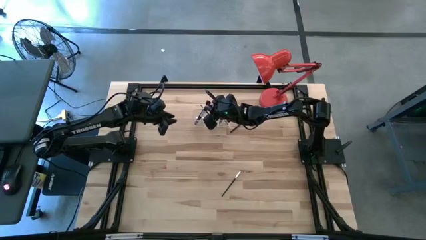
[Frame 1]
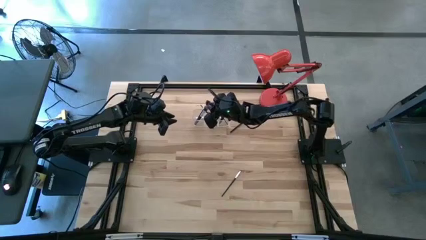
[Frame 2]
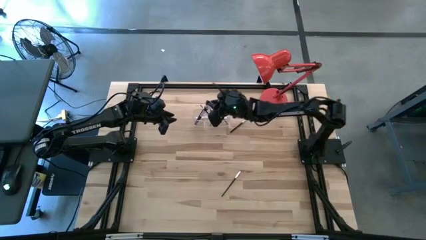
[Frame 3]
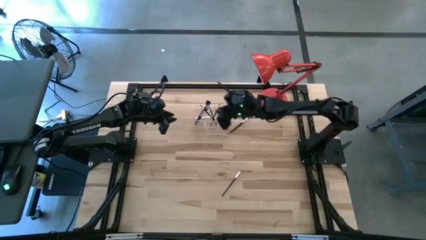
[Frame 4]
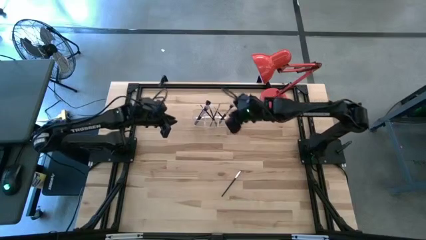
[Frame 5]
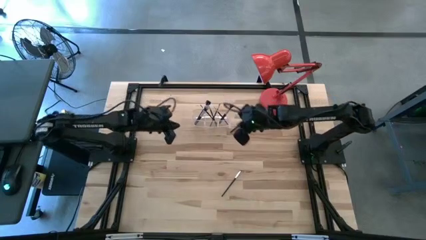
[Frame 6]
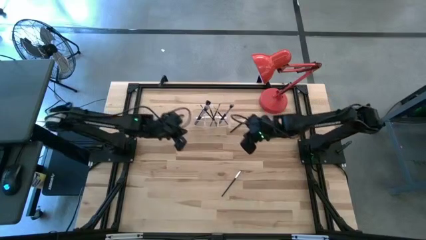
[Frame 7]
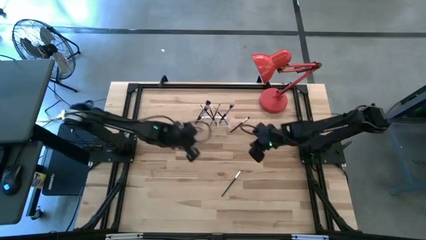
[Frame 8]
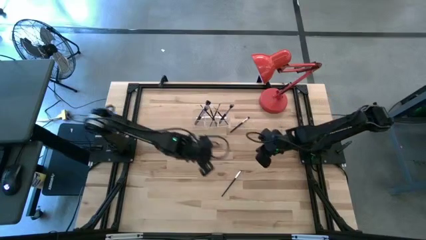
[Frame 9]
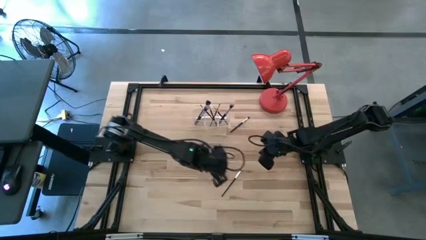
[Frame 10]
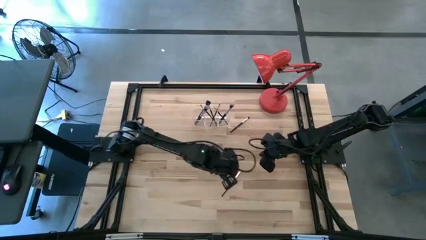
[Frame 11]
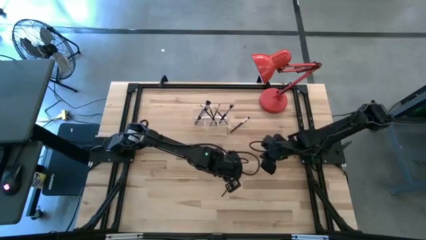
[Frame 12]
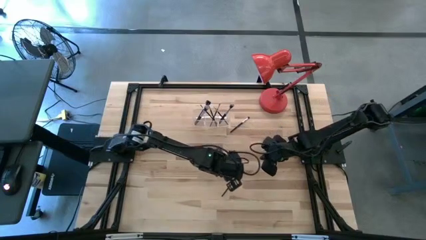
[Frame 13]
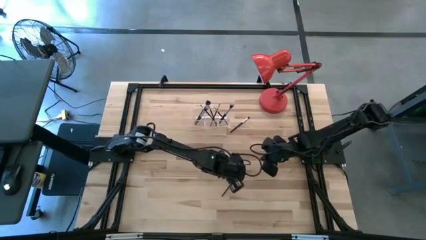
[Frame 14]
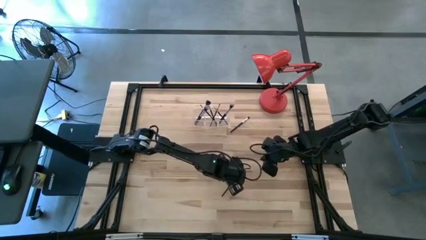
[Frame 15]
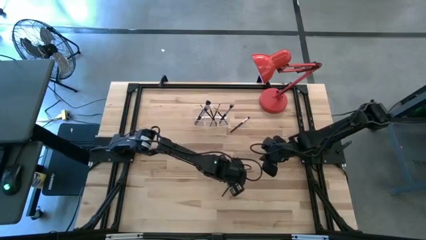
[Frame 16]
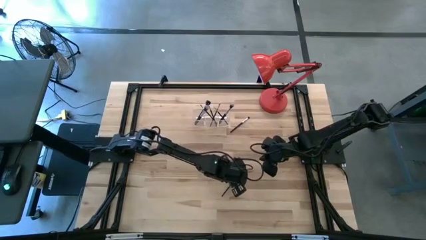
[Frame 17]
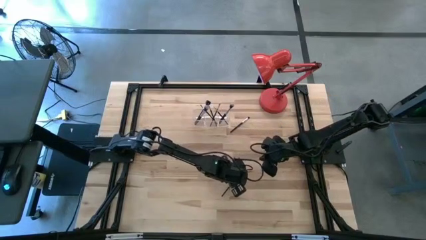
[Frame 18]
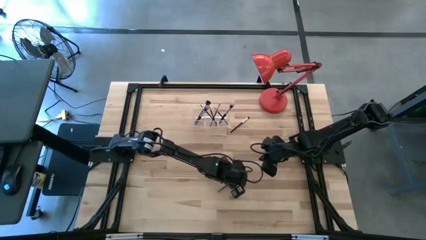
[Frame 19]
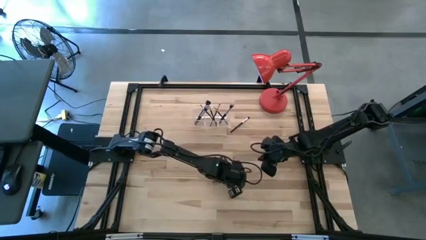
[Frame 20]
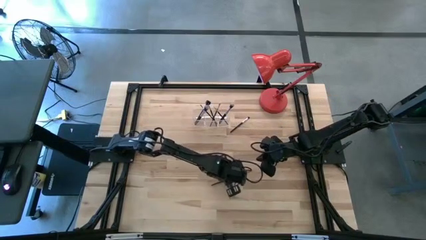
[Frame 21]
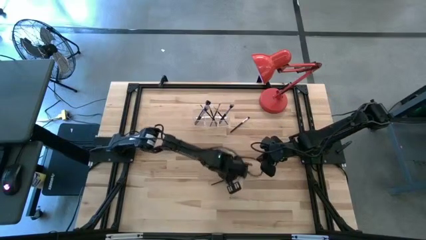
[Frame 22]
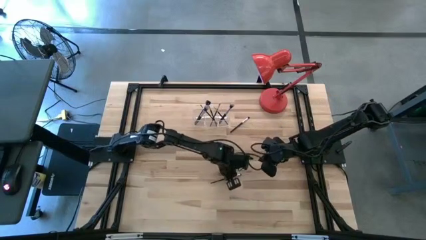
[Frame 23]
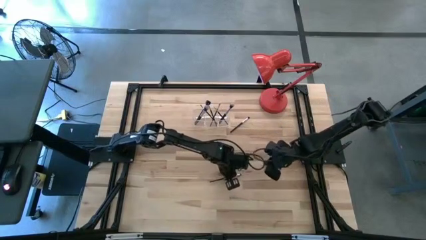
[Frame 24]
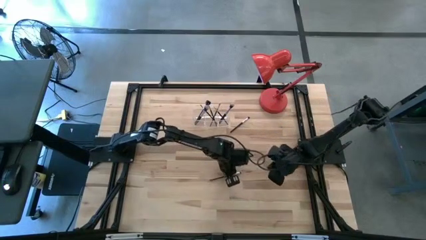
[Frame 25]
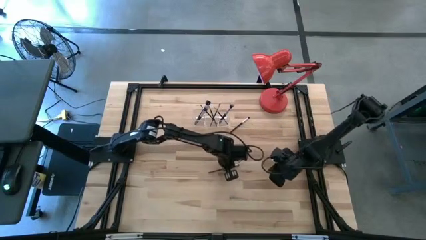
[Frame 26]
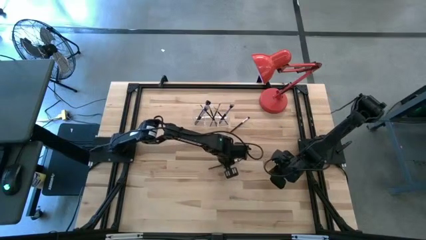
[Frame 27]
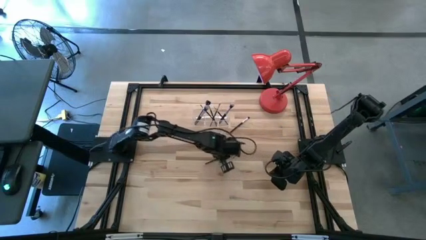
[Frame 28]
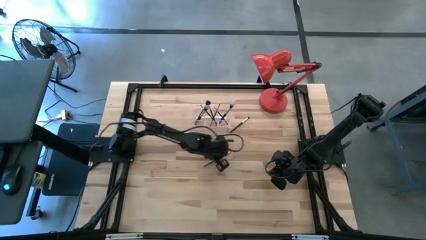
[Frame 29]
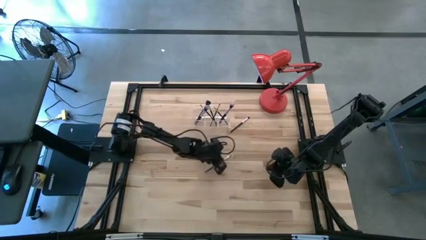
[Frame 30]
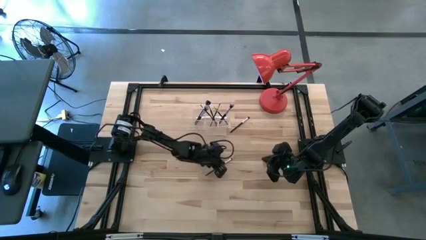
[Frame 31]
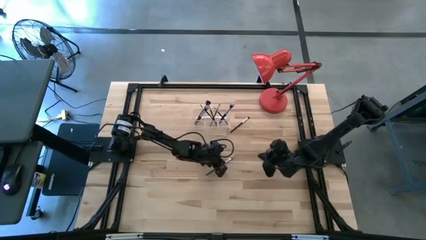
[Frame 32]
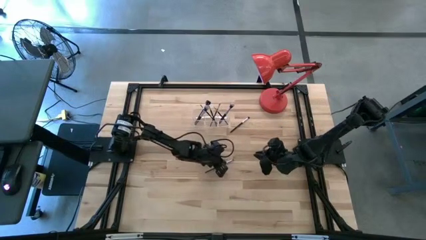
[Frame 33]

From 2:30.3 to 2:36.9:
Task: Put items in baskets/containers
Put the black eyeshadow brush into the transparent organizer

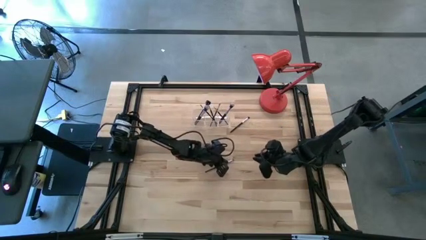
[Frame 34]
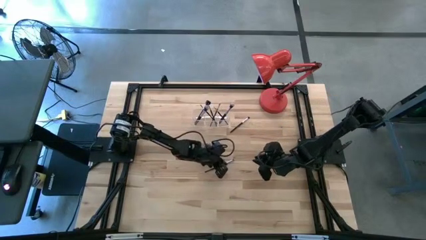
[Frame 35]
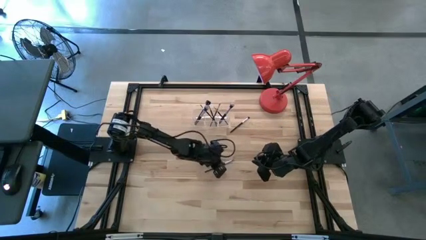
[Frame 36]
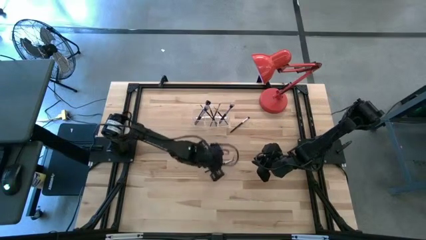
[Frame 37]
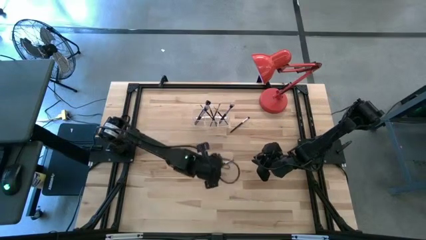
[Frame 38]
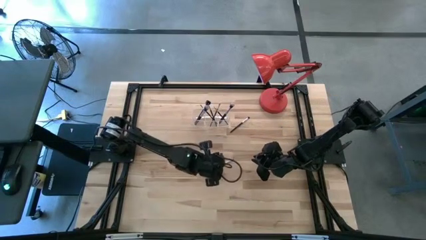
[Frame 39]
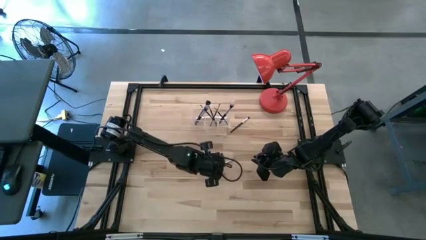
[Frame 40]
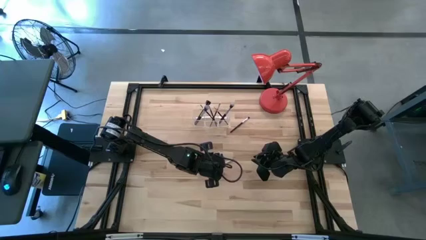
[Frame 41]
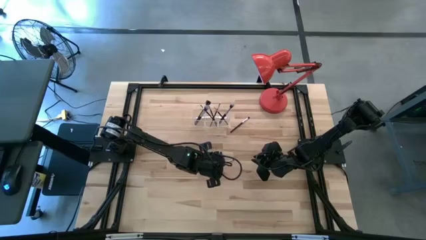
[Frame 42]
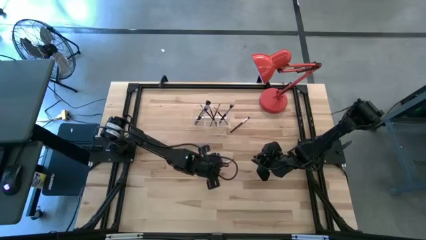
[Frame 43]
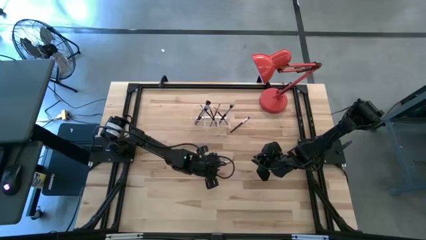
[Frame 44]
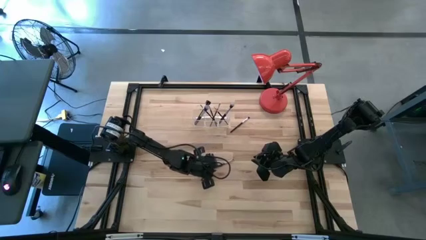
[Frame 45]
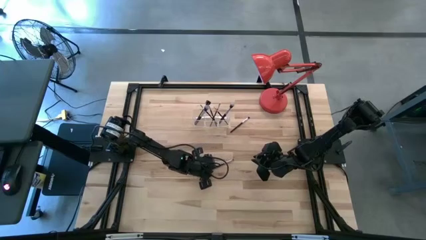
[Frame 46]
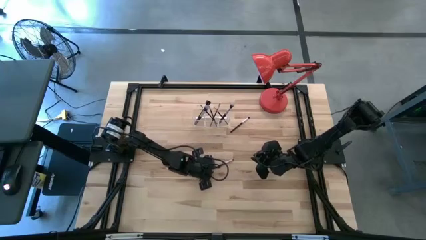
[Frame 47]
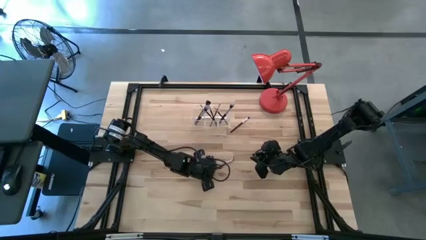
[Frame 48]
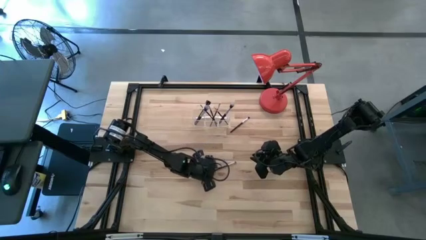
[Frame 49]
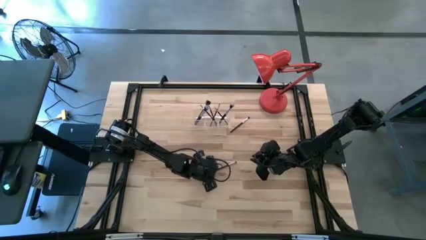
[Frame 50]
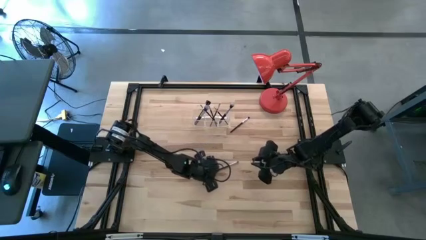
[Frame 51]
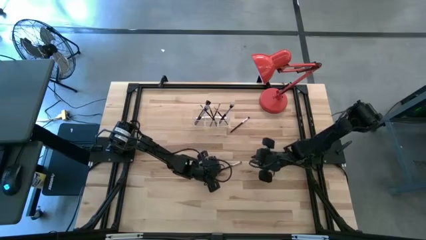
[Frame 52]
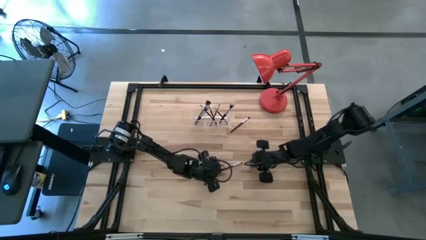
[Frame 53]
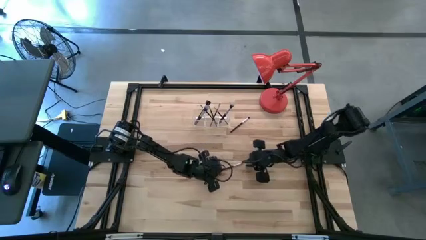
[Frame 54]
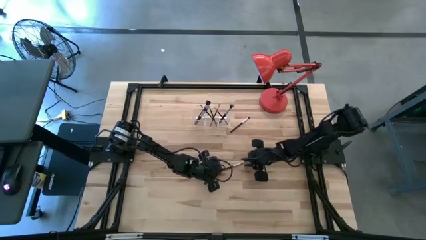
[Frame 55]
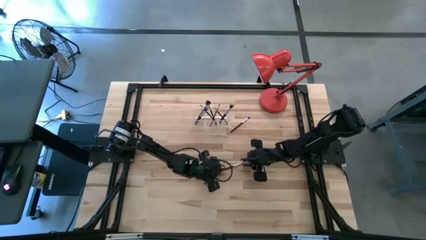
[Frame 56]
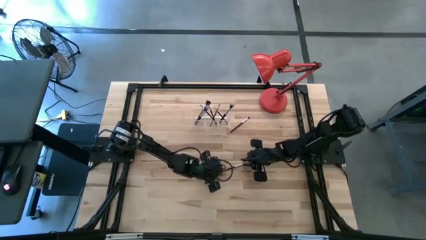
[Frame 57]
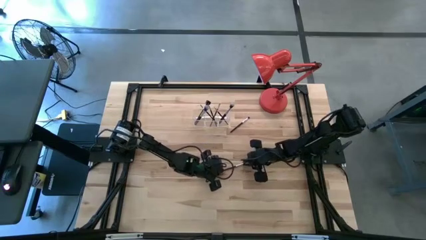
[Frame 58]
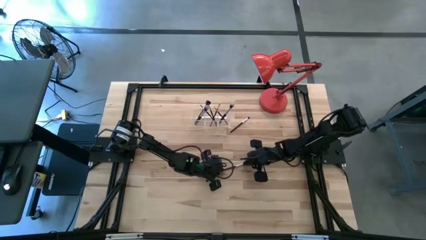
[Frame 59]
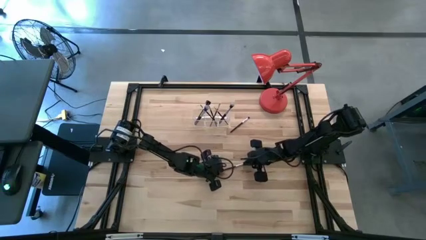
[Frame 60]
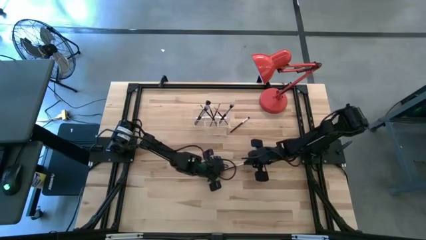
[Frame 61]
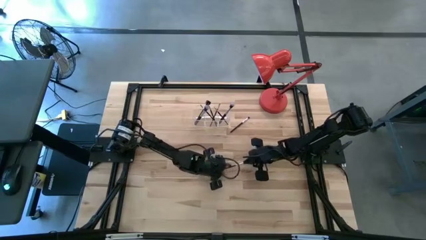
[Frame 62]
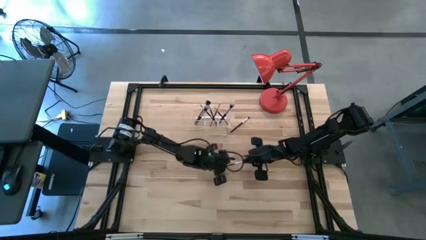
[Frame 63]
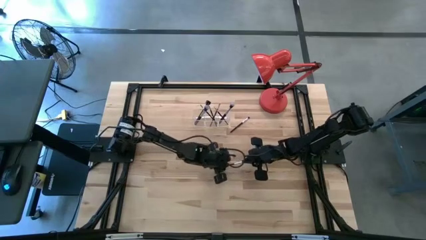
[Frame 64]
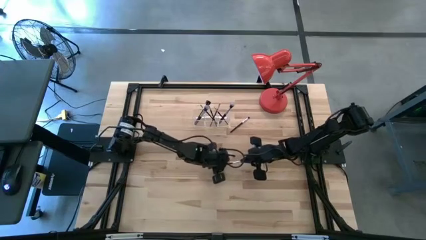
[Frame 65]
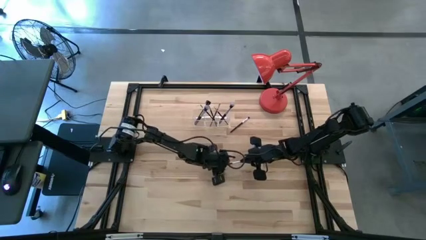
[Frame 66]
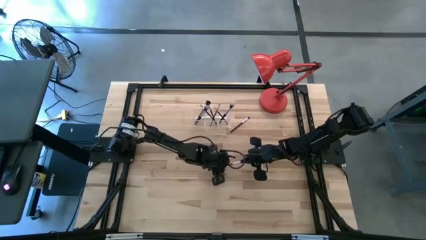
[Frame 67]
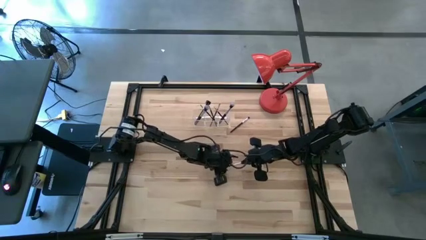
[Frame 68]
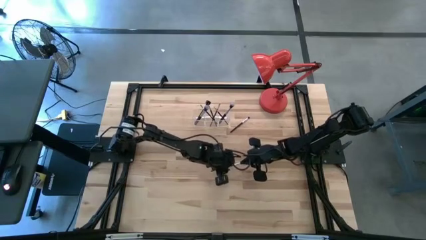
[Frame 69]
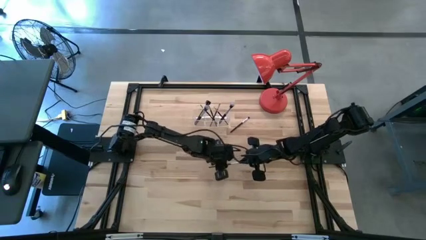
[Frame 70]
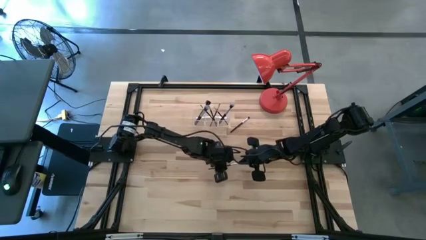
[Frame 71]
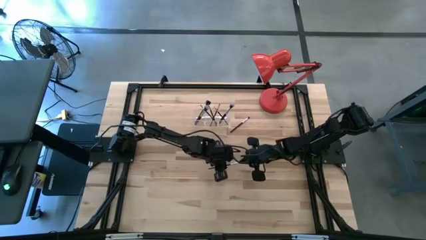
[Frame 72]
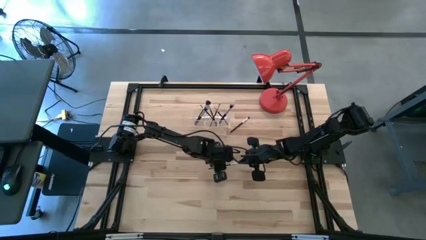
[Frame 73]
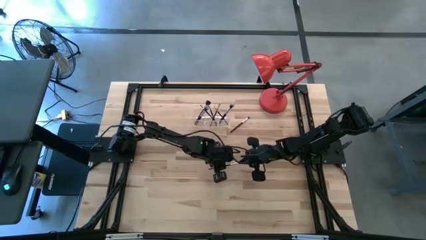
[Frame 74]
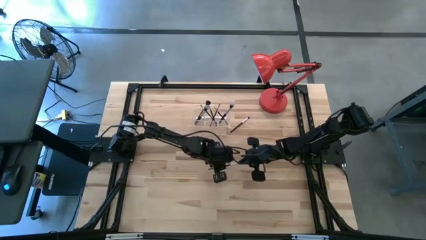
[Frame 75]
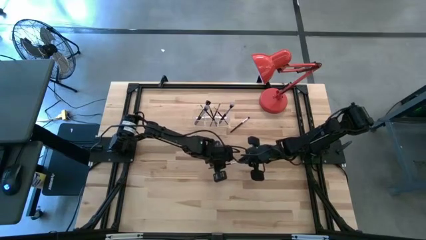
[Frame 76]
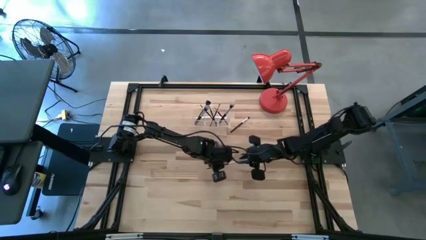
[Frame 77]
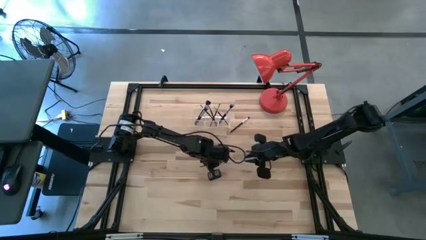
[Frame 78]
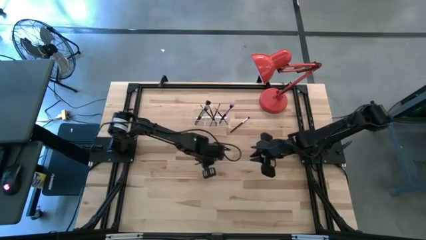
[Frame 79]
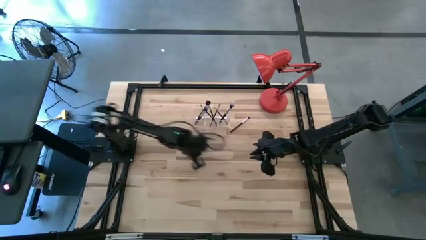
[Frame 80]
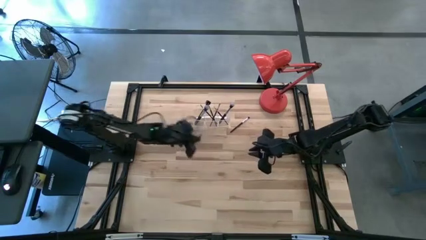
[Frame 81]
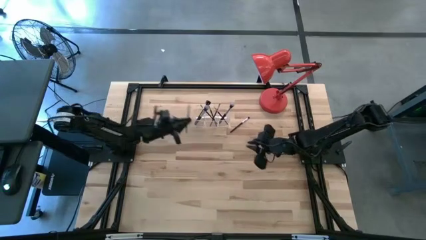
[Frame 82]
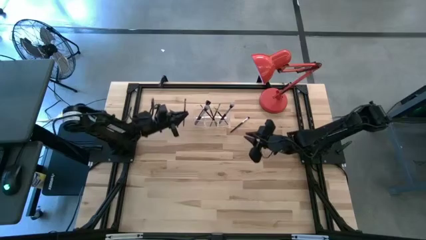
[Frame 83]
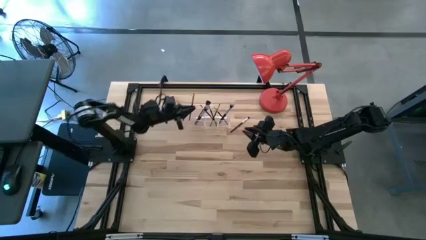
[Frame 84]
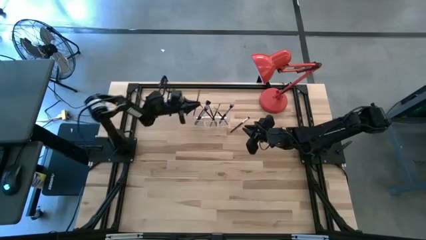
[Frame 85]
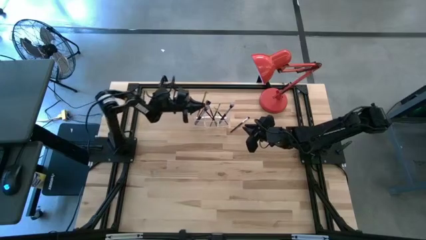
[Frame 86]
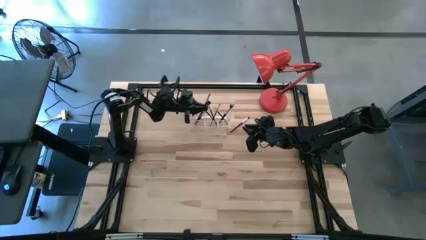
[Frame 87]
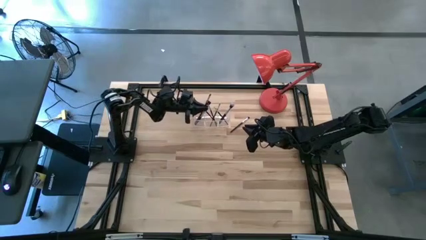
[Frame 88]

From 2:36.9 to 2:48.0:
Put the black eyeshadow brush into the transparent organizer
